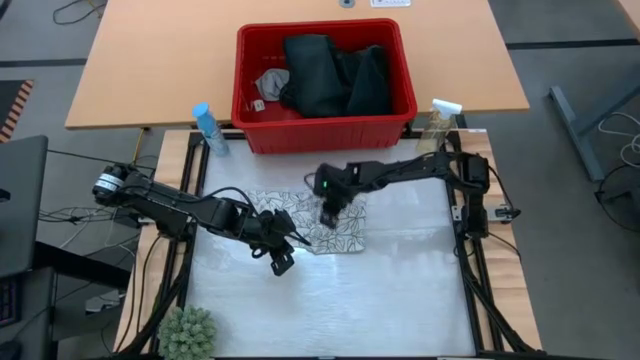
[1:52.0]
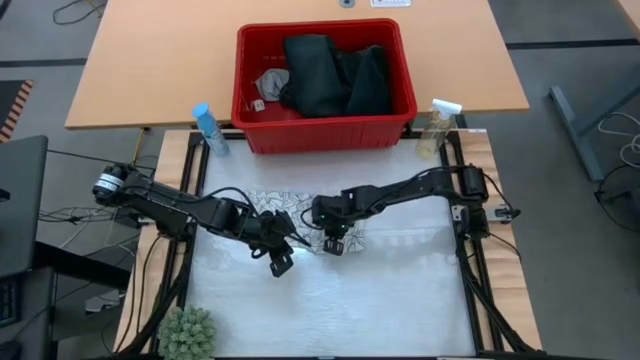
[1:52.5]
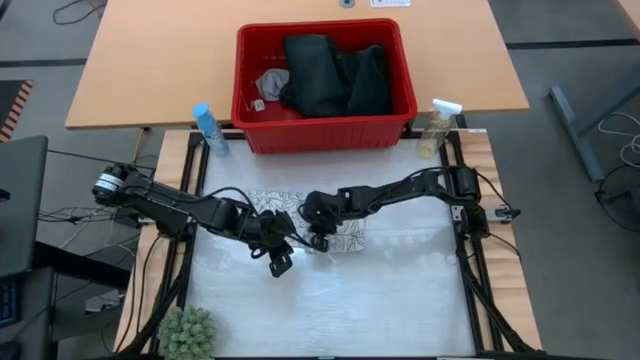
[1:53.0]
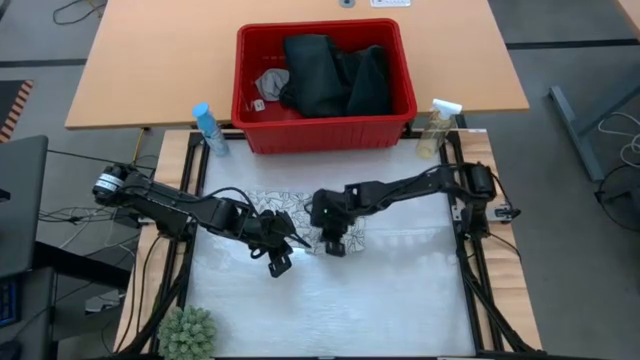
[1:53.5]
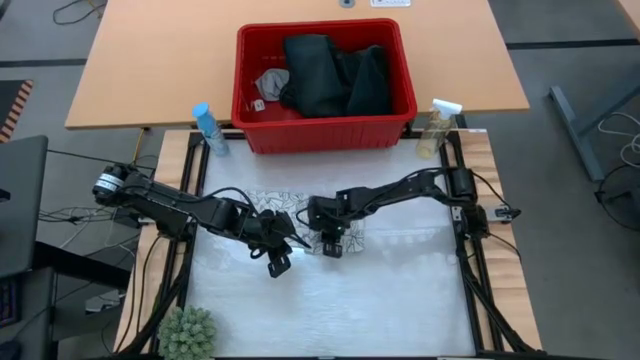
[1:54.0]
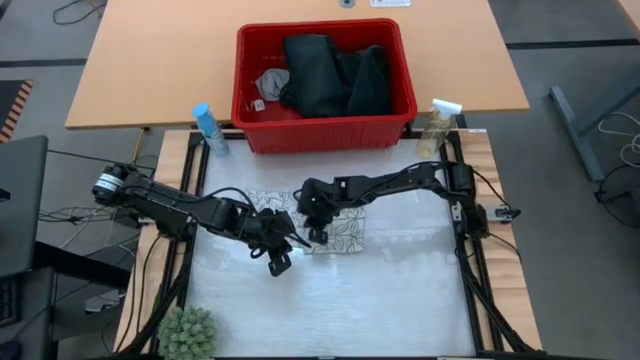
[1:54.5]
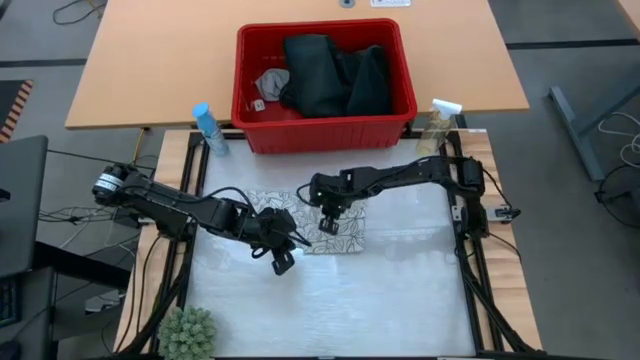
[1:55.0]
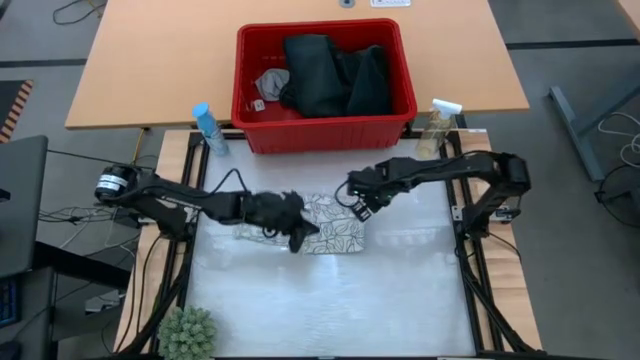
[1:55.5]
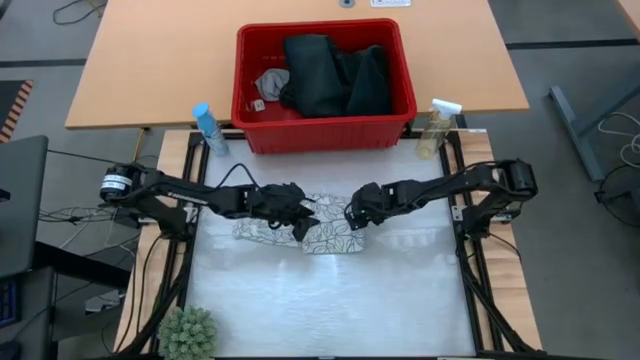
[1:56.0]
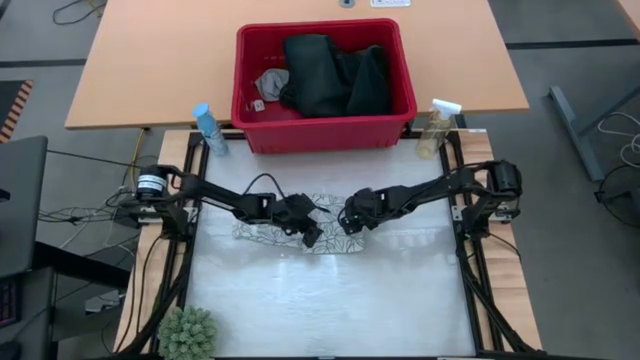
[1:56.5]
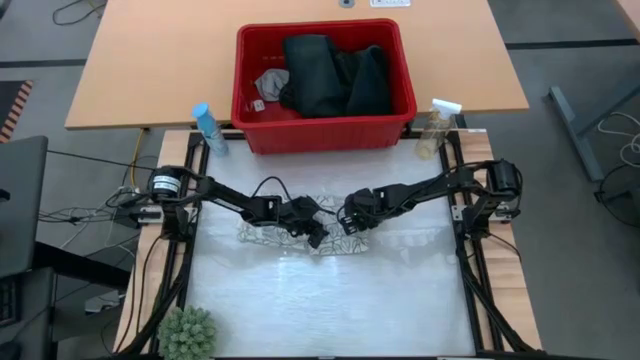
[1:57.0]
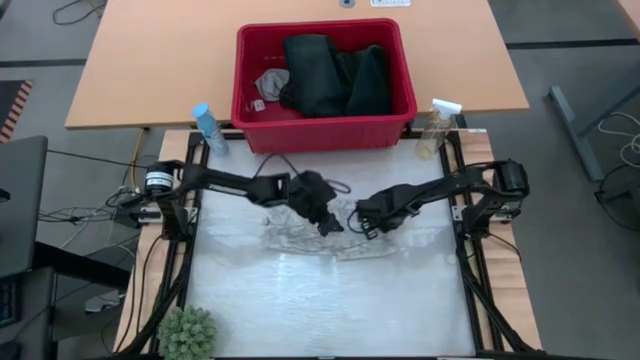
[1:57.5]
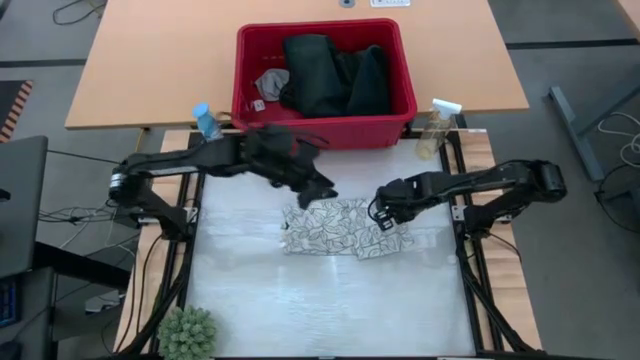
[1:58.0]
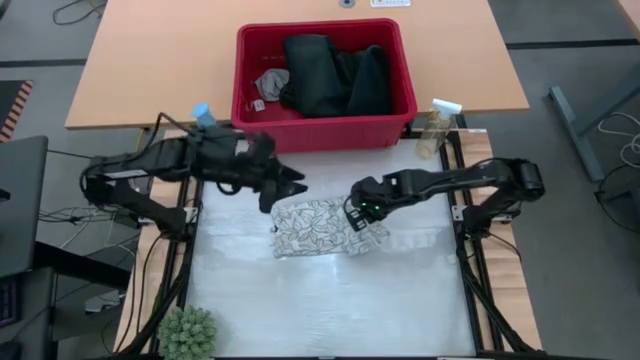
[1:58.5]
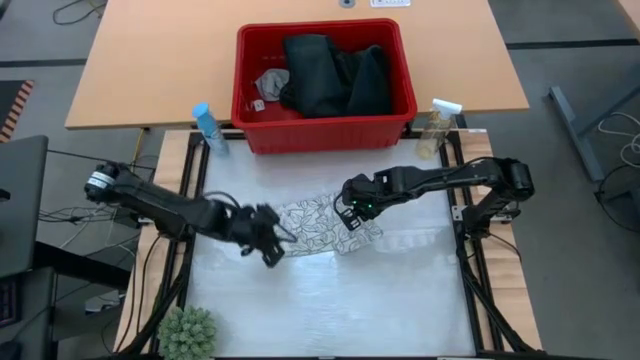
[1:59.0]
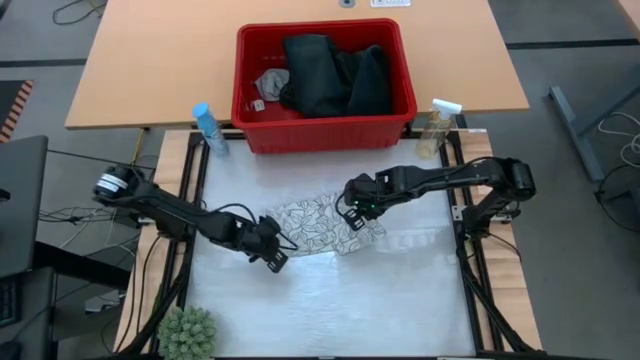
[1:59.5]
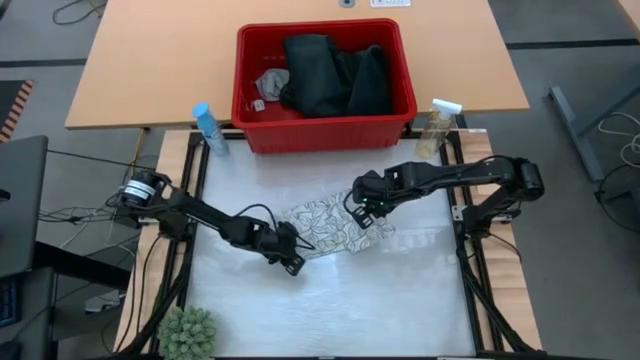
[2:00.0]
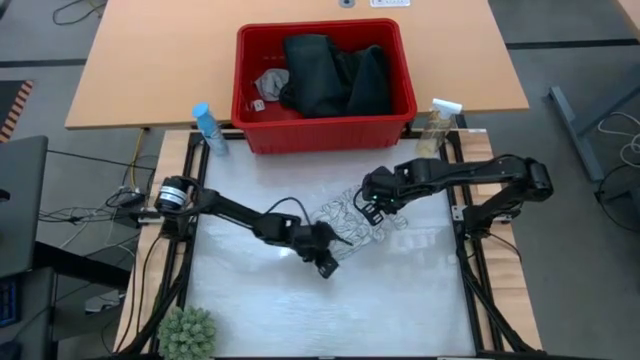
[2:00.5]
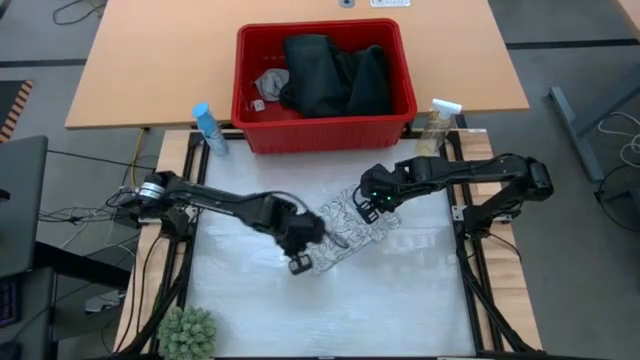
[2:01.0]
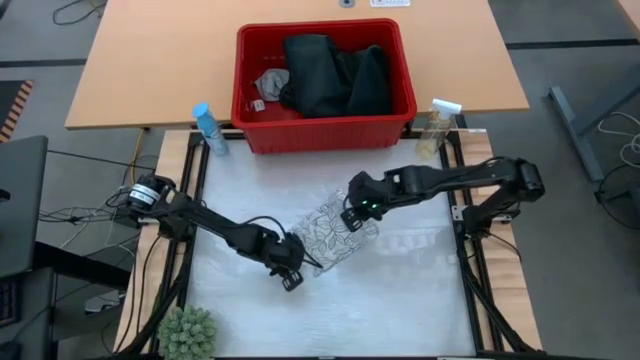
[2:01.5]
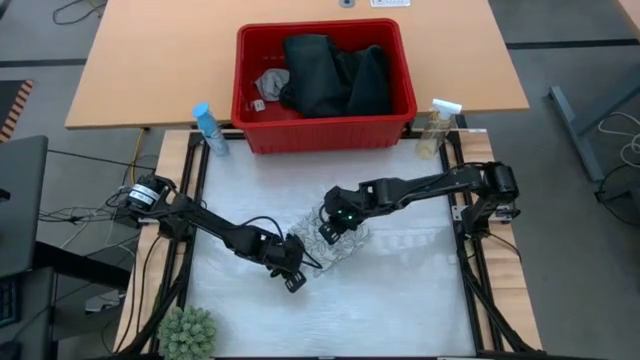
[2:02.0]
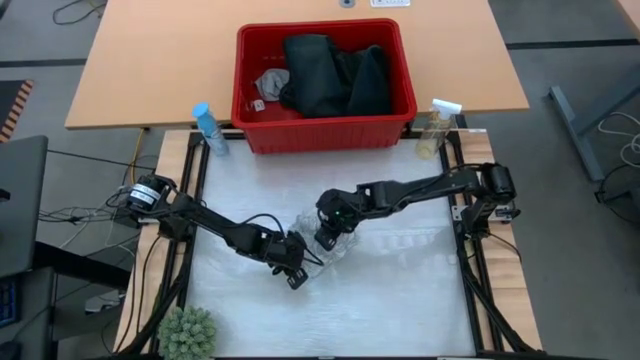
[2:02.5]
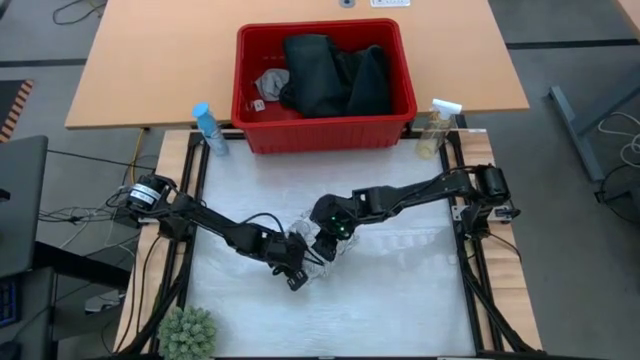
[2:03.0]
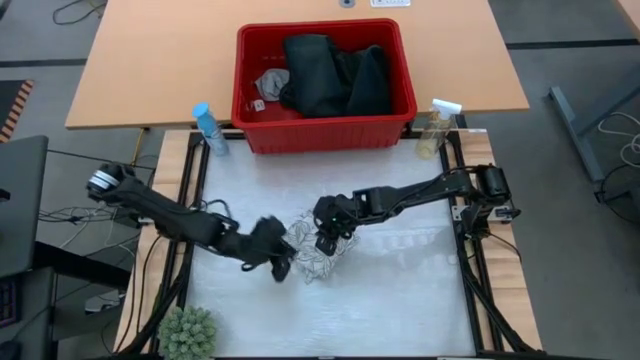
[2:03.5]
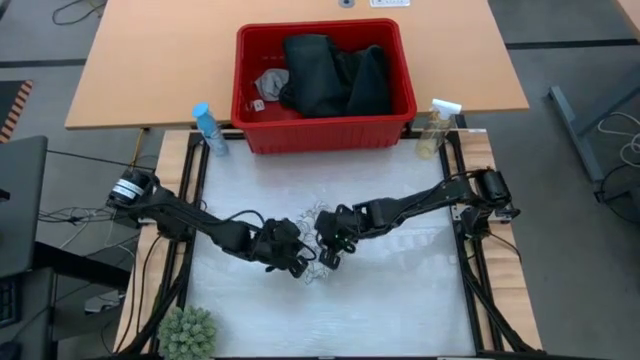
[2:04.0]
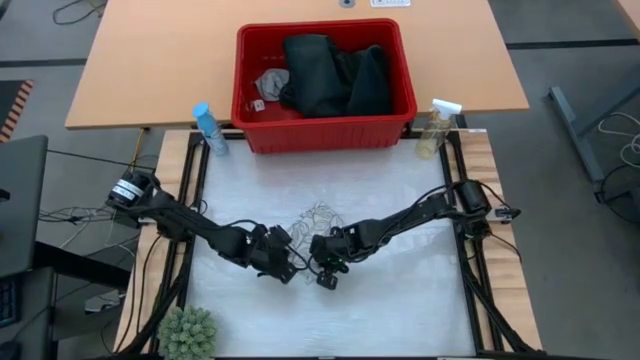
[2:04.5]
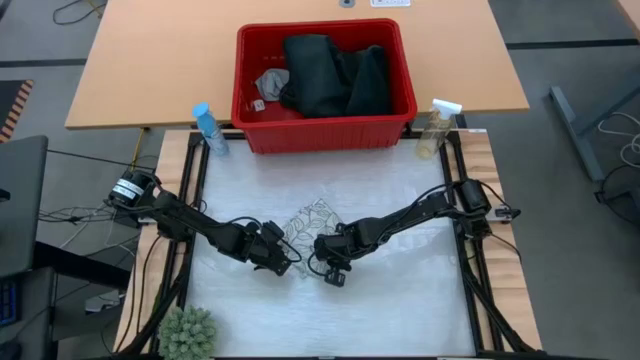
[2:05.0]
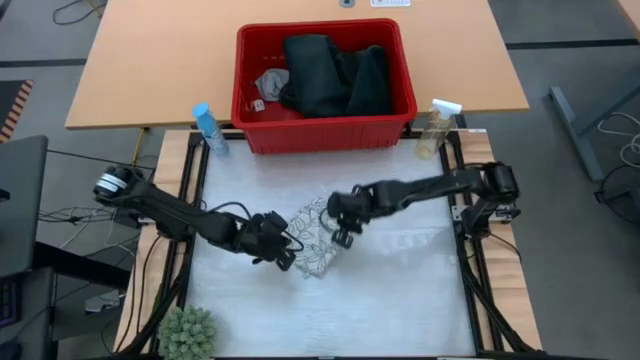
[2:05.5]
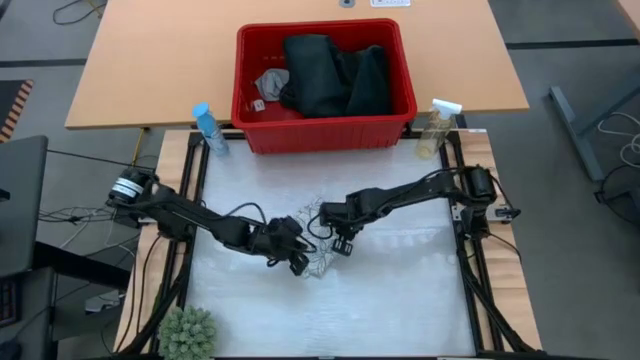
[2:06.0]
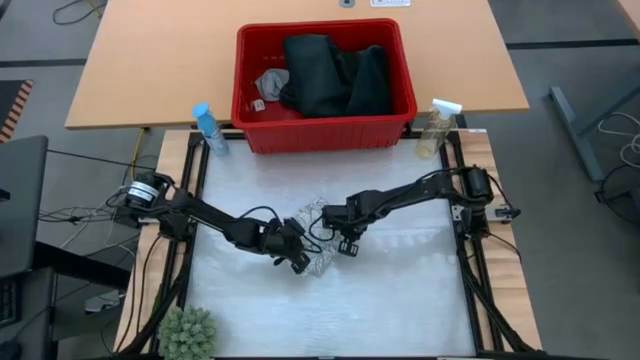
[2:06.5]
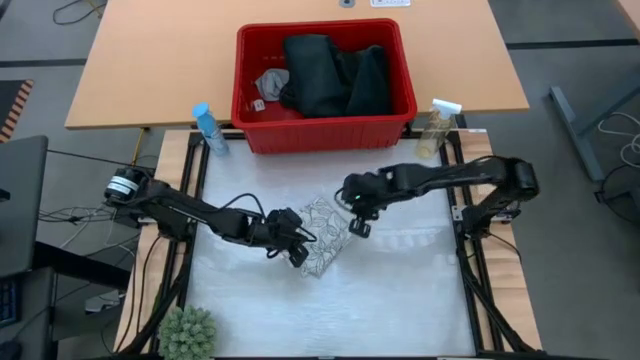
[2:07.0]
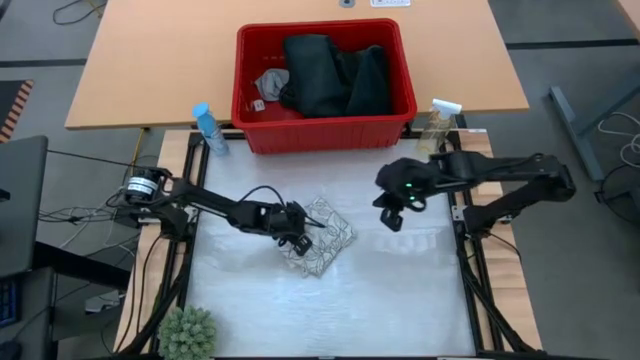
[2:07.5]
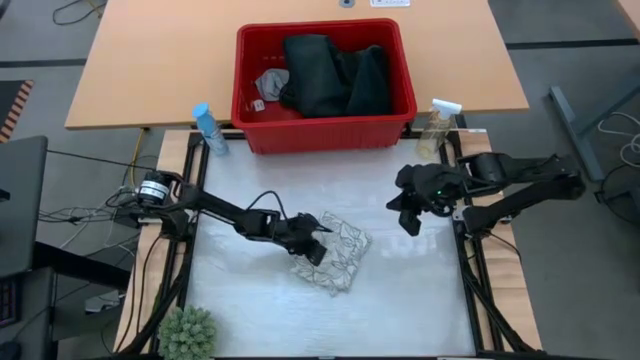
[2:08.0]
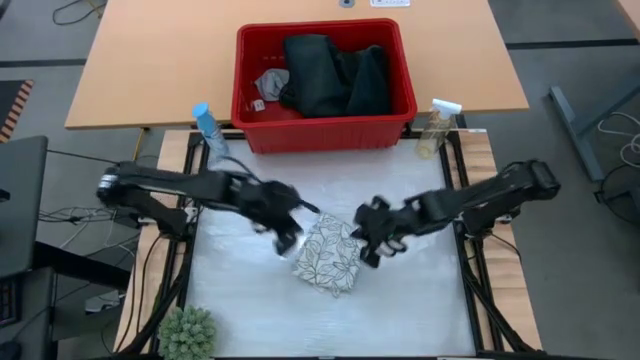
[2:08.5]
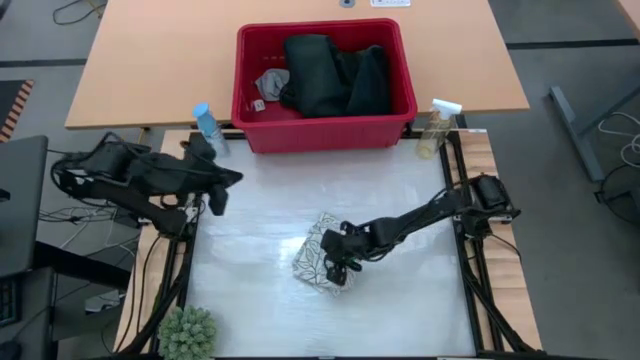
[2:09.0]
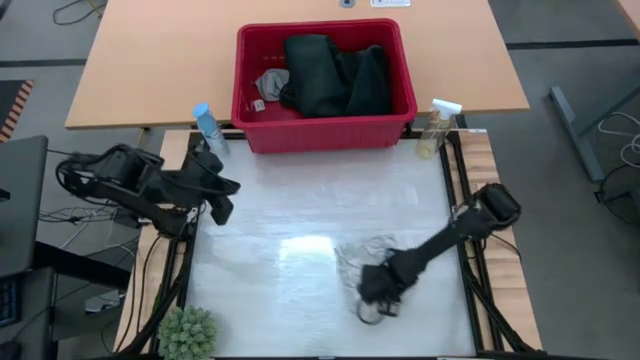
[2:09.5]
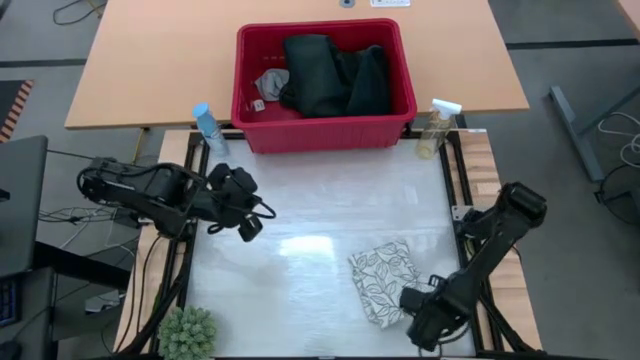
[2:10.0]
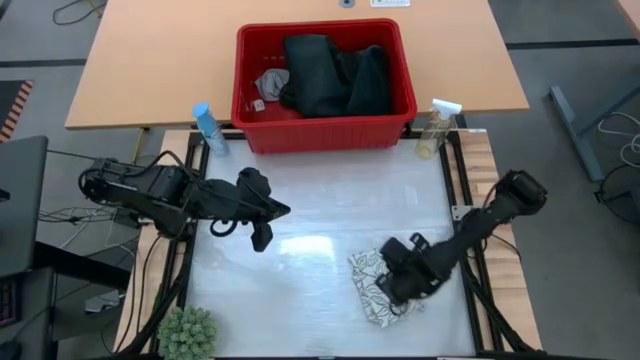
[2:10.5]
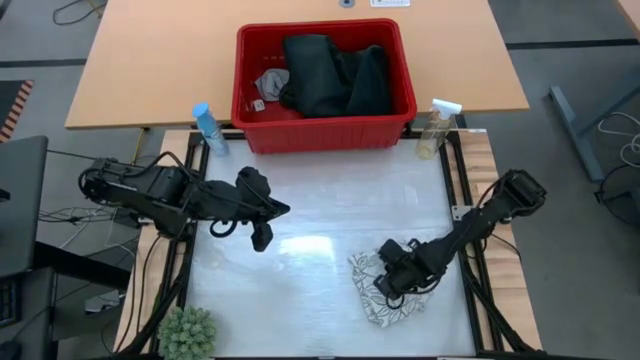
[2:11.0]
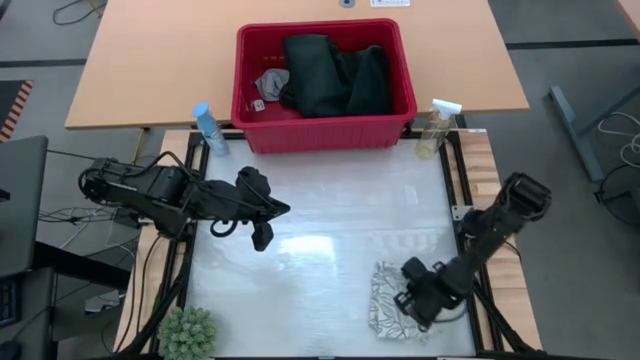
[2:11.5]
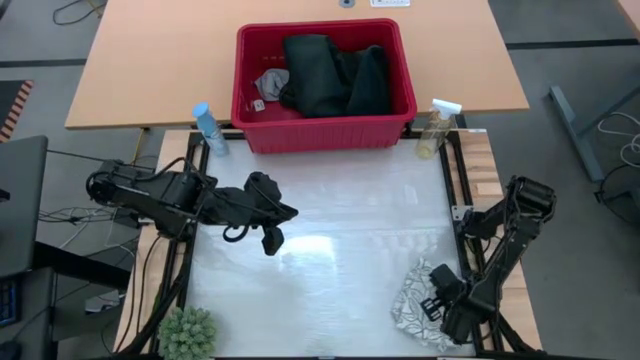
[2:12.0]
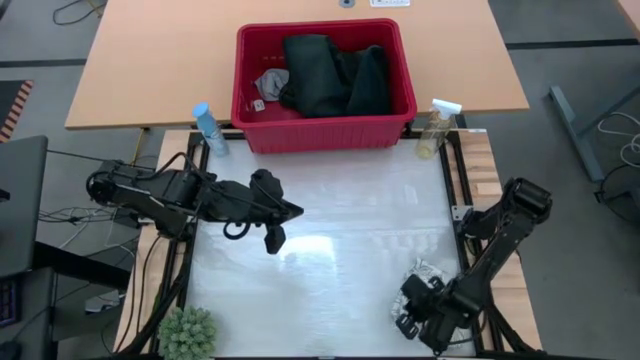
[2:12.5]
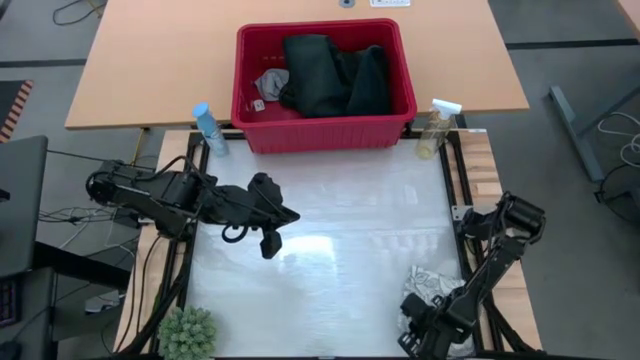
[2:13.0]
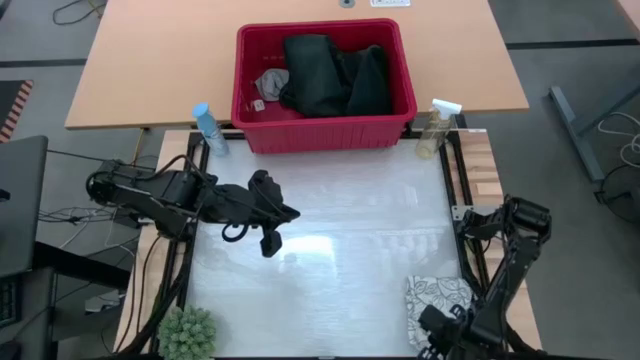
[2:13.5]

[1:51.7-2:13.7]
Task: Fold laundry
Fold the white-patterned shirt
